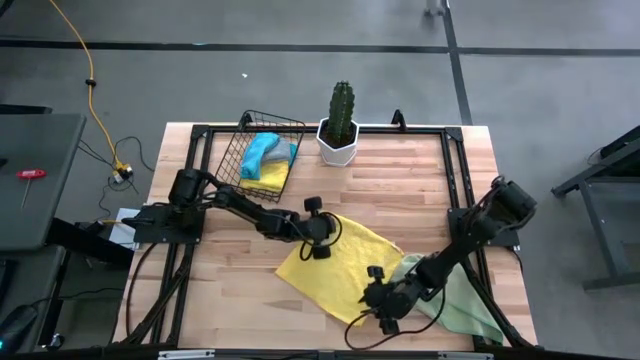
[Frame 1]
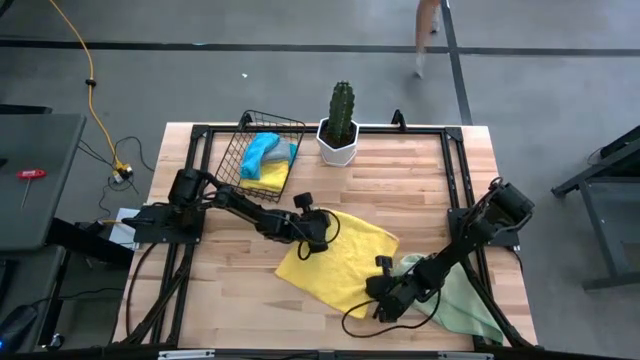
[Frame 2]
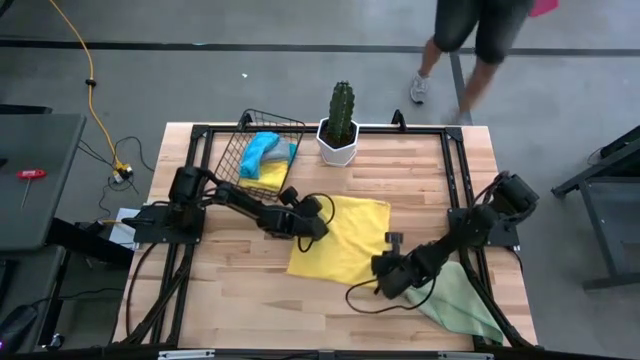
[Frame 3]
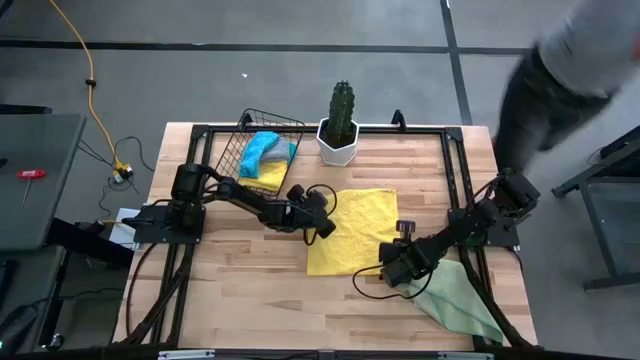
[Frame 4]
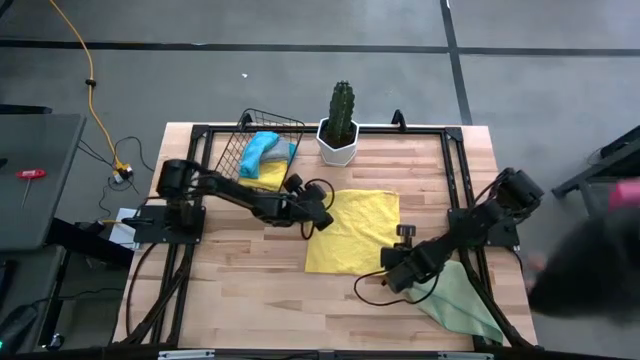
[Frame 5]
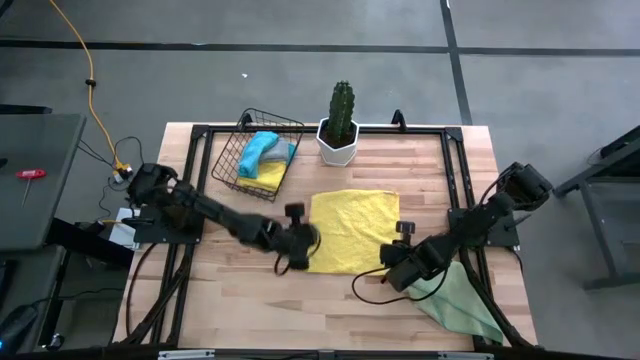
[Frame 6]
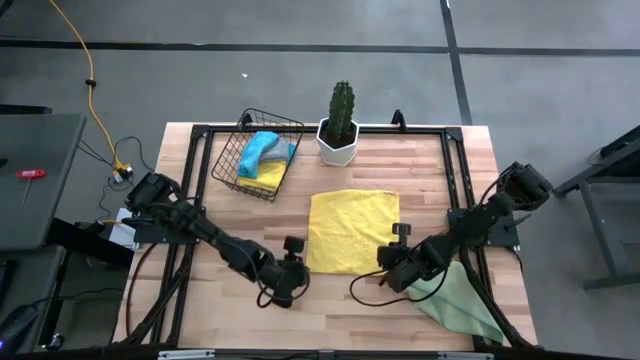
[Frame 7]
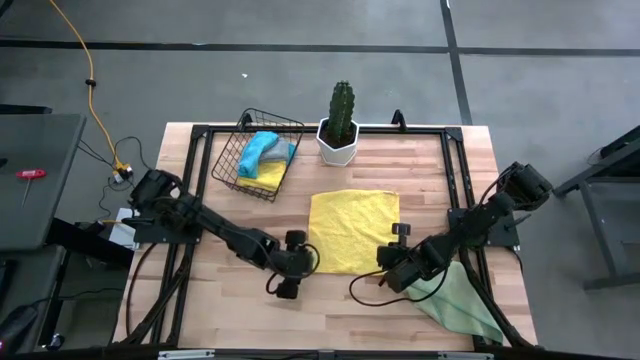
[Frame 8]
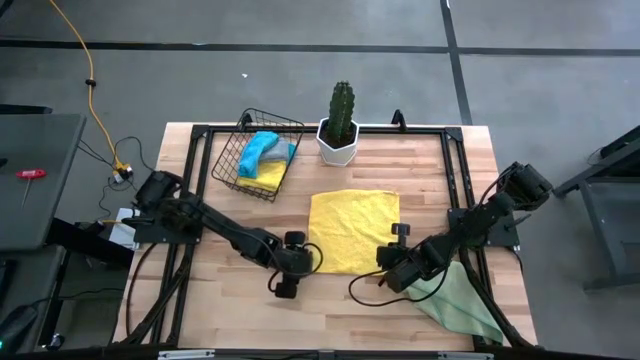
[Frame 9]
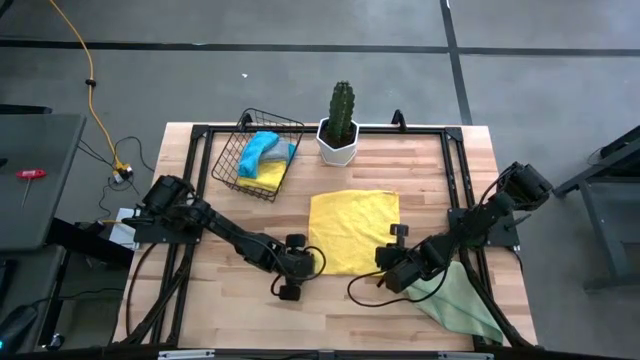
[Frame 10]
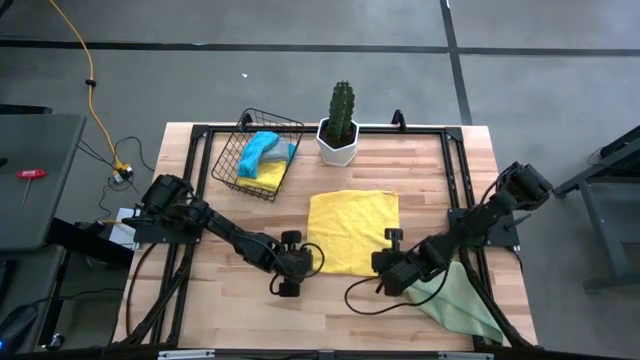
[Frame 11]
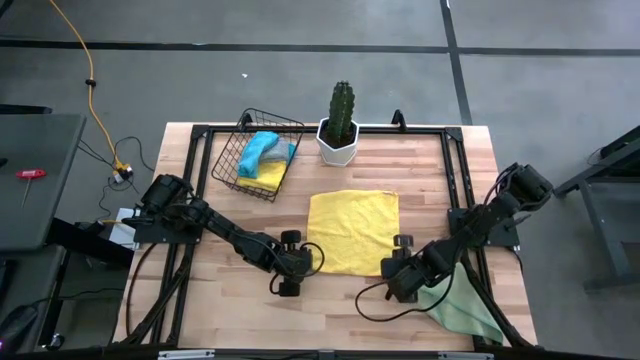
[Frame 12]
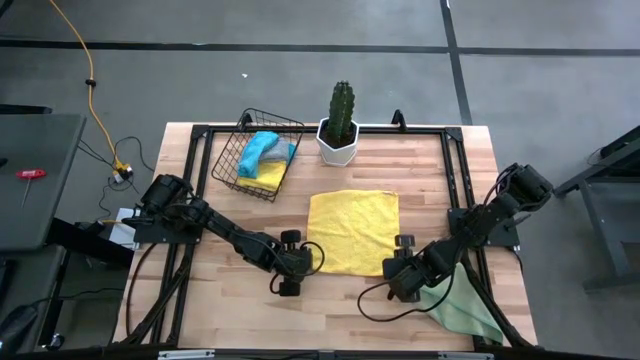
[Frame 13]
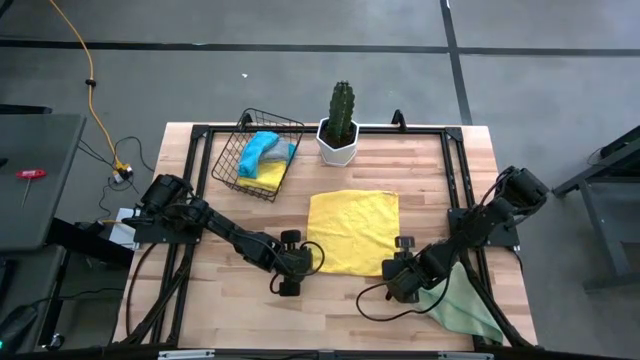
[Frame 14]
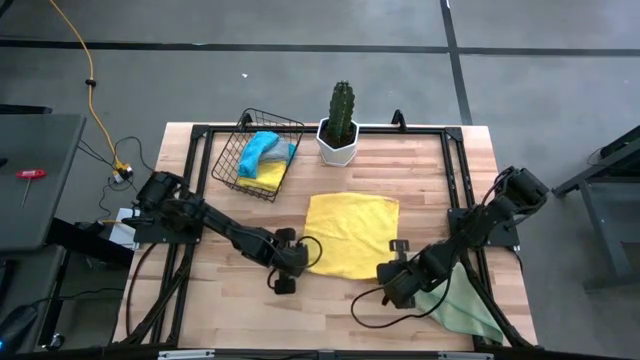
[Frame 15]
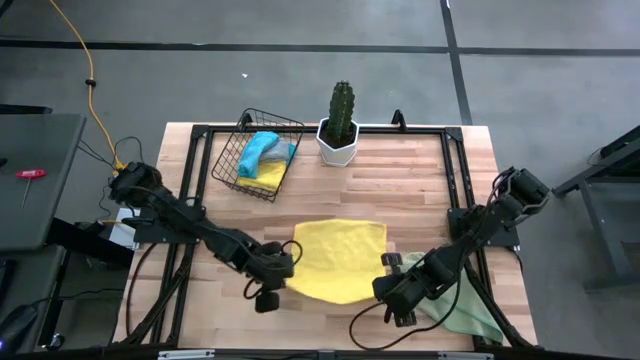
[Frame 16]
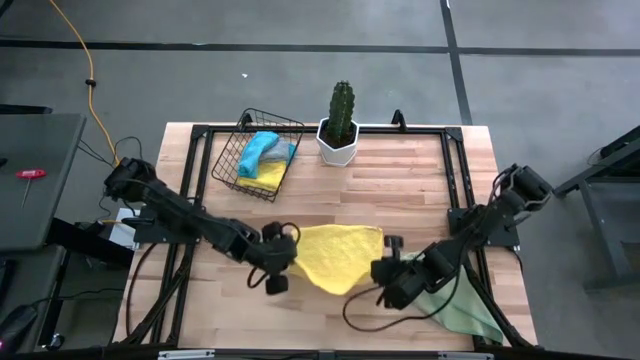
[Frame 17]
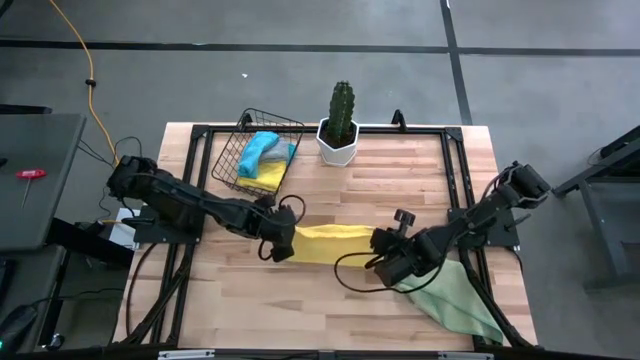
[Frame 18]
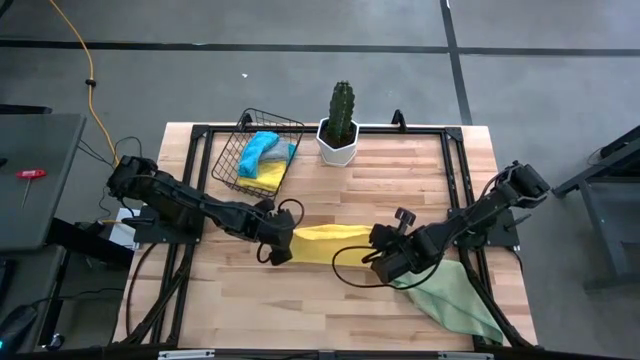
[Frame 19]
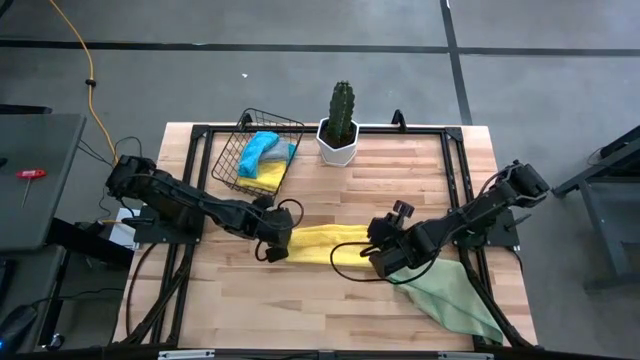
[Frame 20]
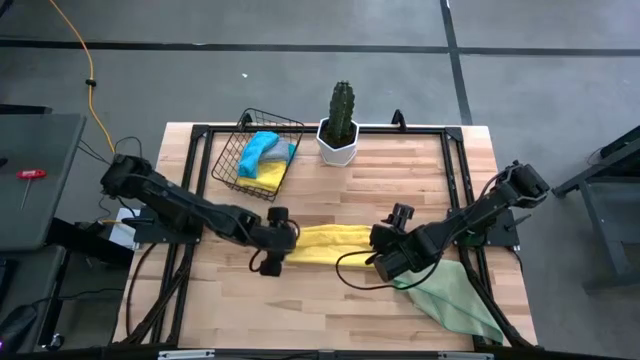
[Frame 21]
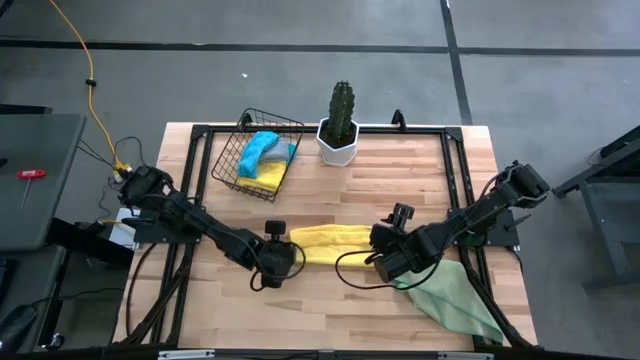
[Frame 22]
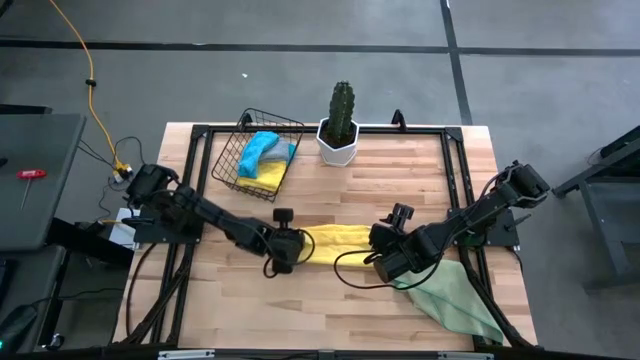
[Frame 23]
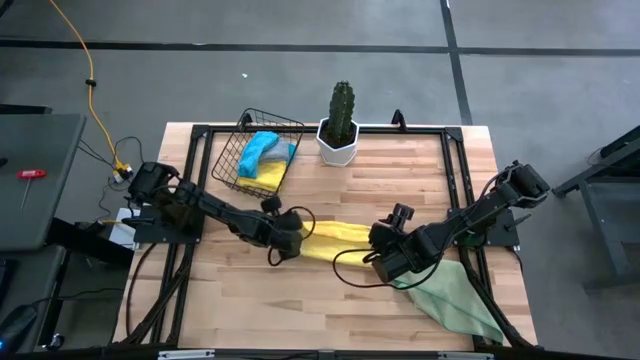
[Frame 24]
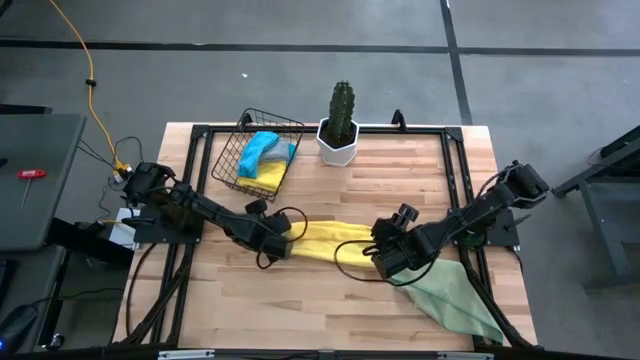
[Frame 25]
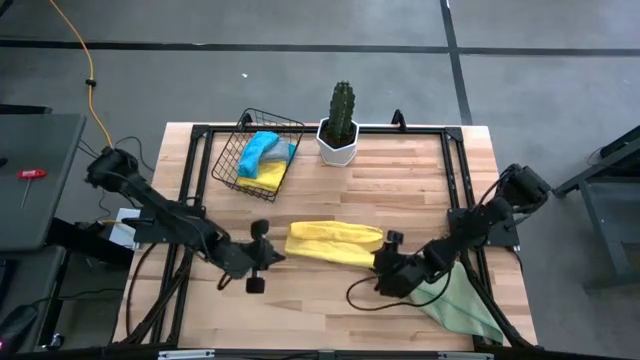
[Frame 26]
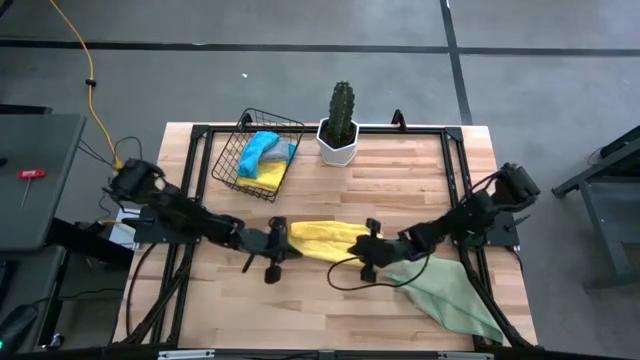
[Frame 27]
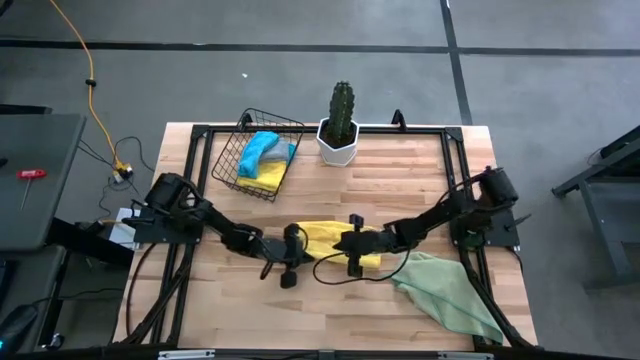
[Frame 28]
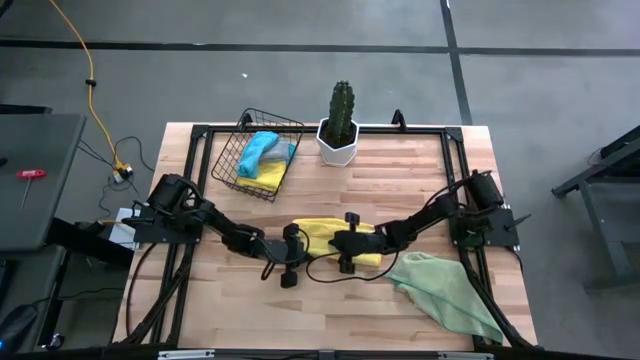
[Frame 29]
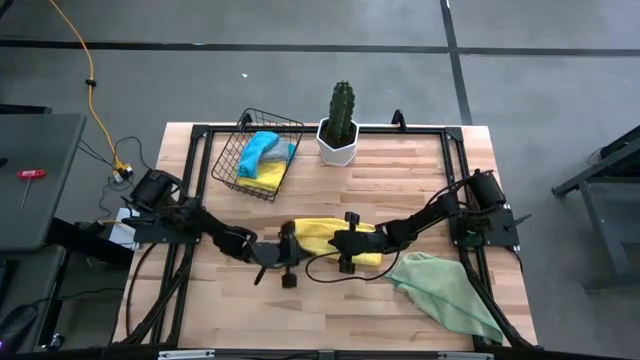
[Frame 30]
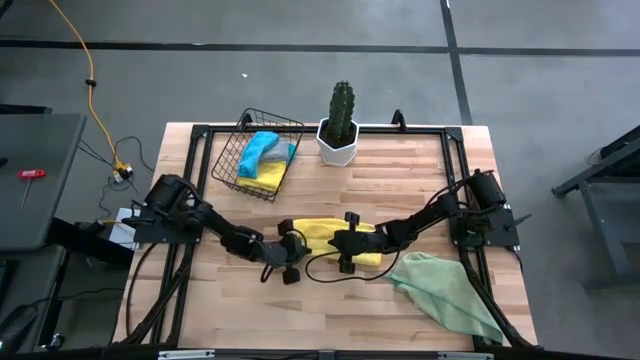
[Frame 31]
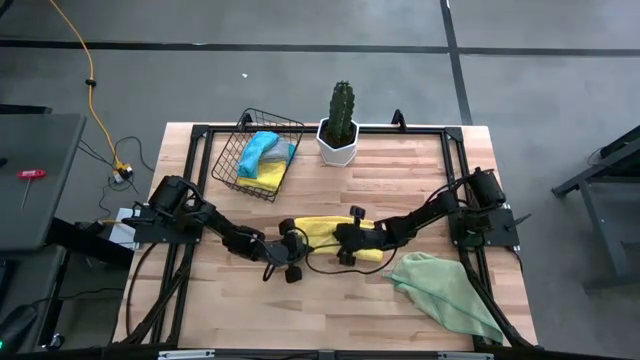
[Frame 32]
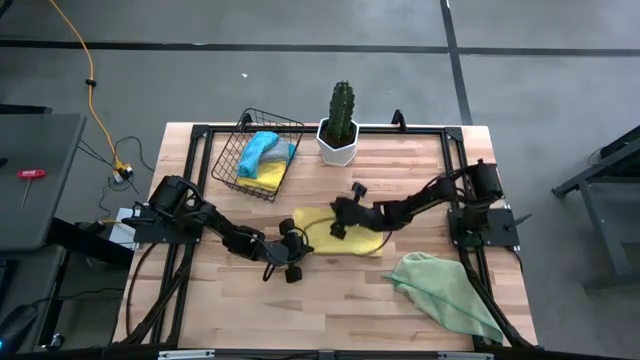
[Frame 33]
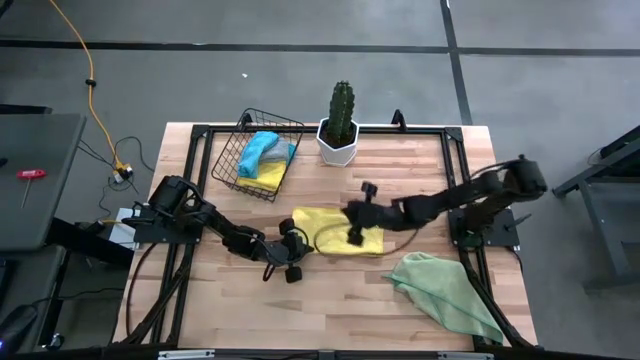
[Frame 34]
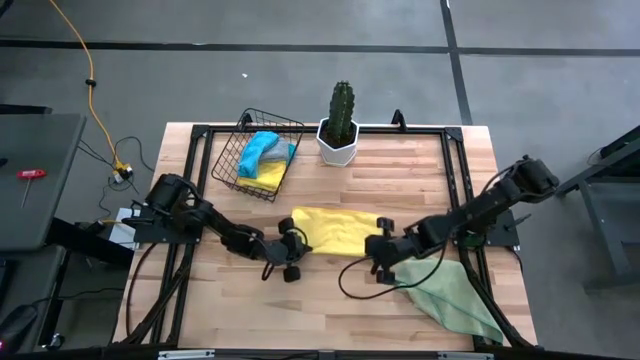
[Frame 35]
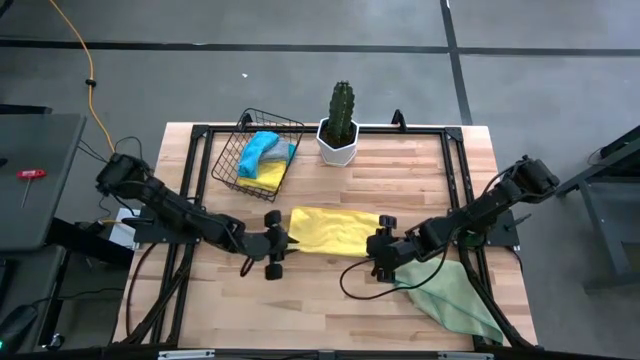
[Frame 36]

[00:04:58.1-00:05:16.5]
Task: Fold microfiber towels
Fold the yellow microfiber towel on the table

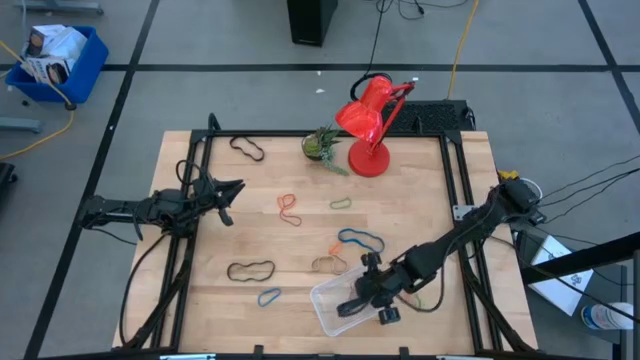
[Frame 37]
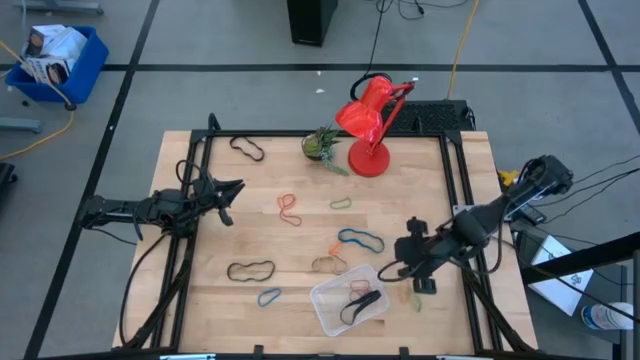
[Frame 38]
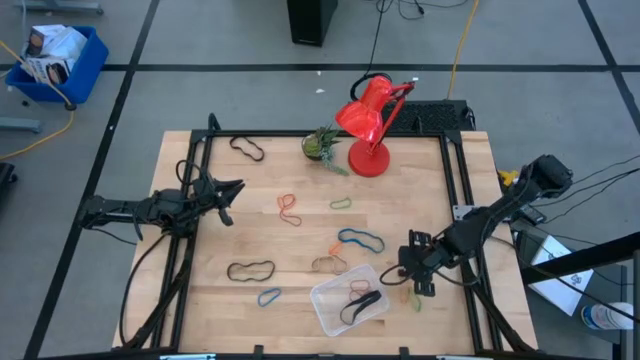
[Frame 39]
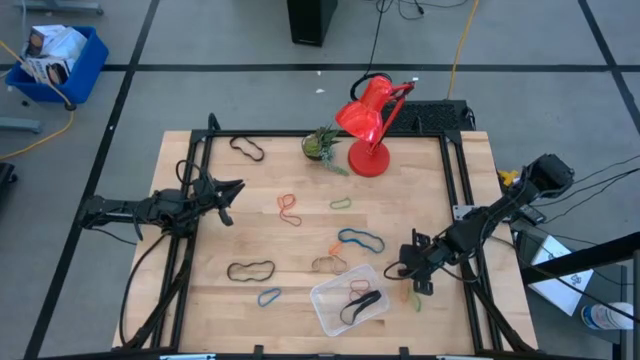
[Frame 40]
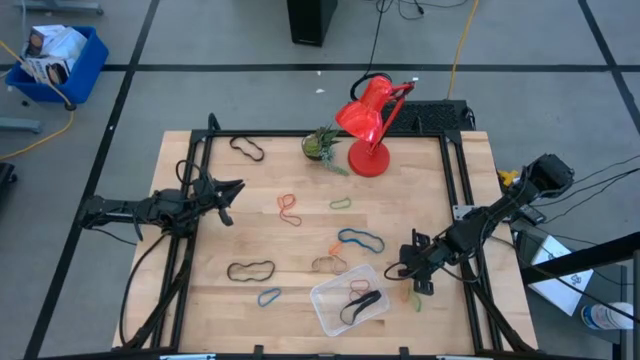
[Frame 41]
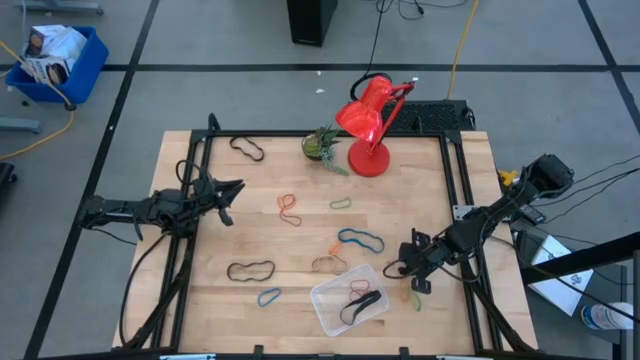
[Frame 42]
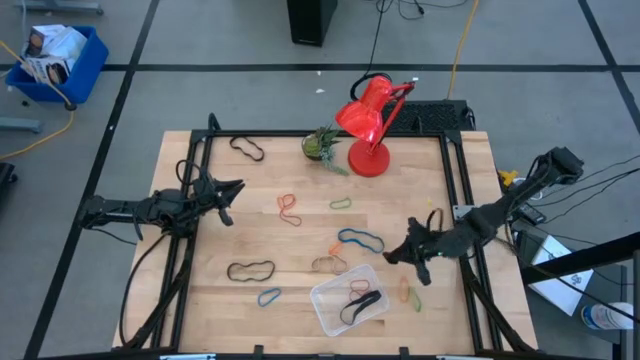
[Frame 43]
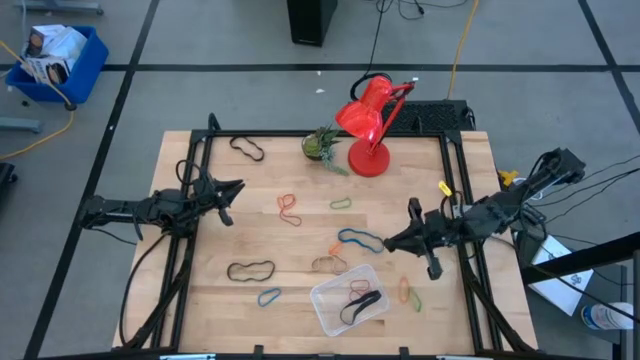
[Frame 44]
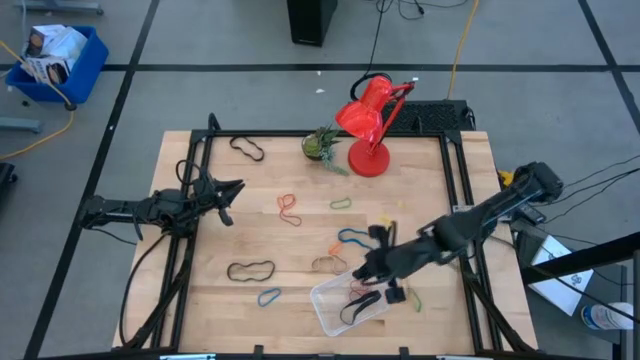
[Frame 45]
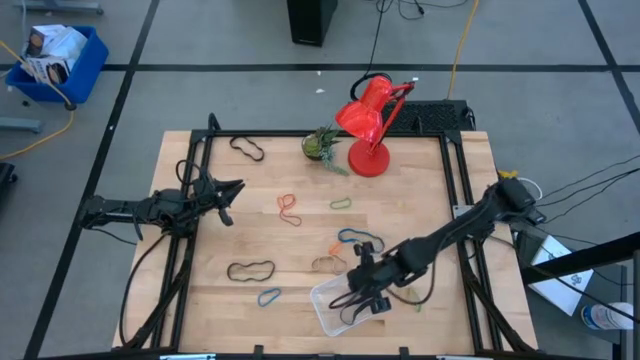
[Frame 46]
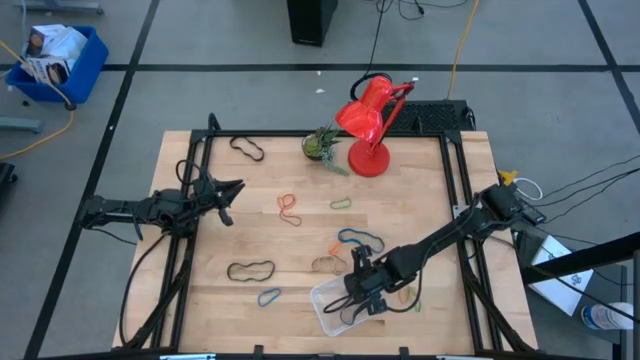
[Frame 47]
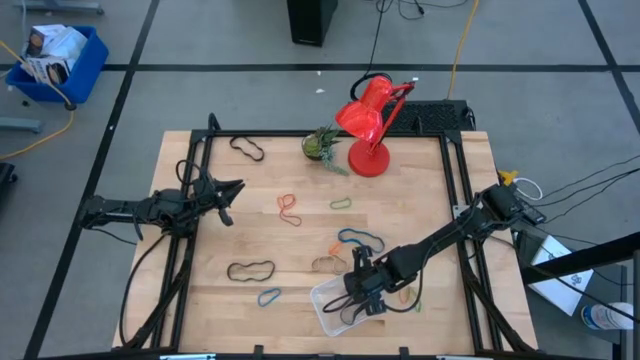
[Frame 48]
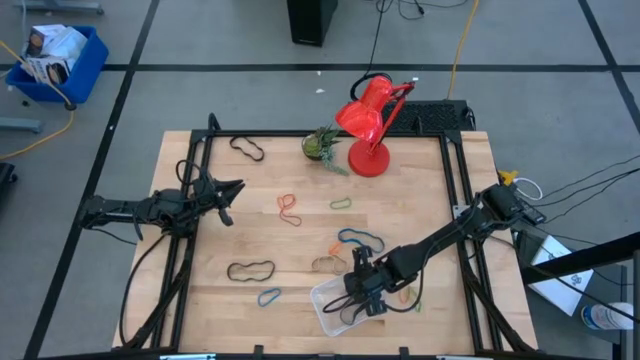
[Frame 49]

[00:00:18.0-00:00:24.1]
Task: Pick and place rubber bands into bin
Put the black rubber band into the transparent container
